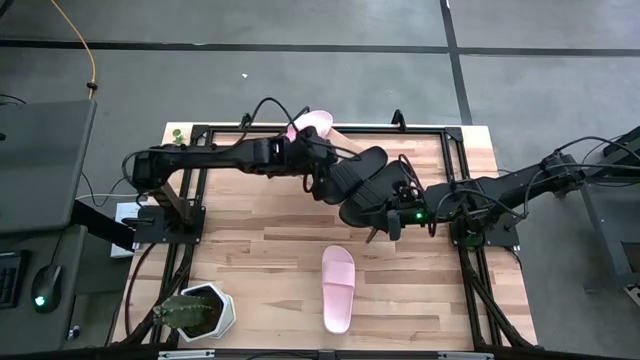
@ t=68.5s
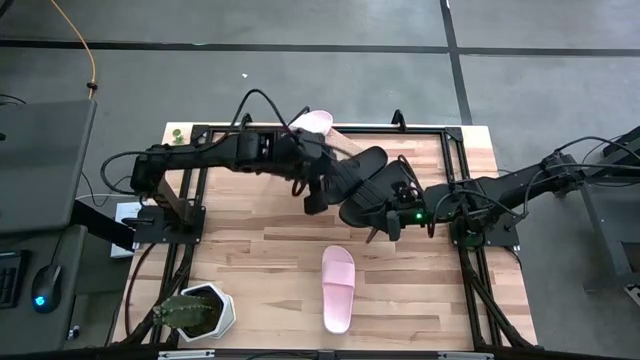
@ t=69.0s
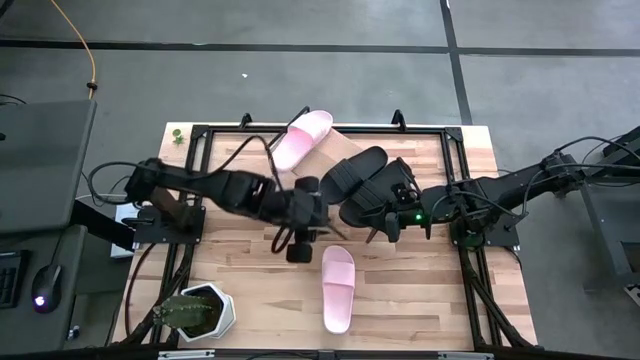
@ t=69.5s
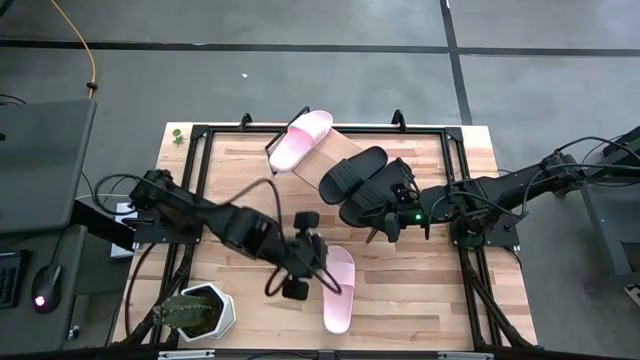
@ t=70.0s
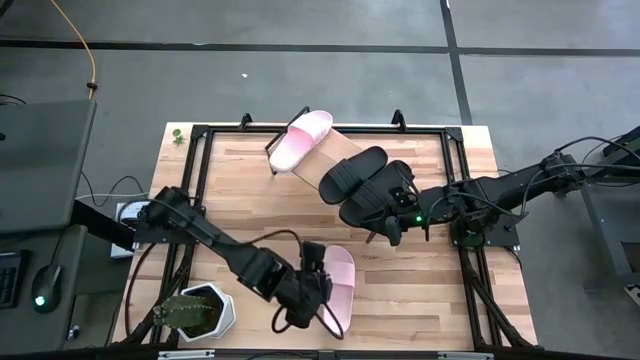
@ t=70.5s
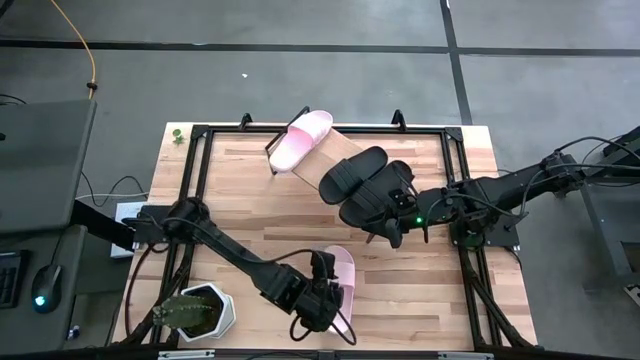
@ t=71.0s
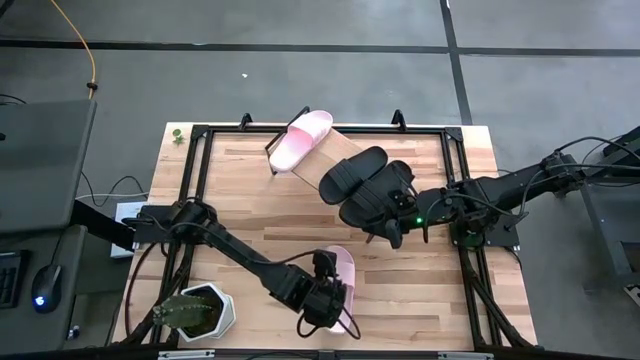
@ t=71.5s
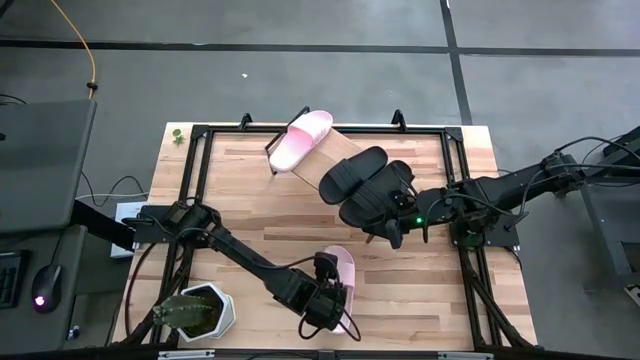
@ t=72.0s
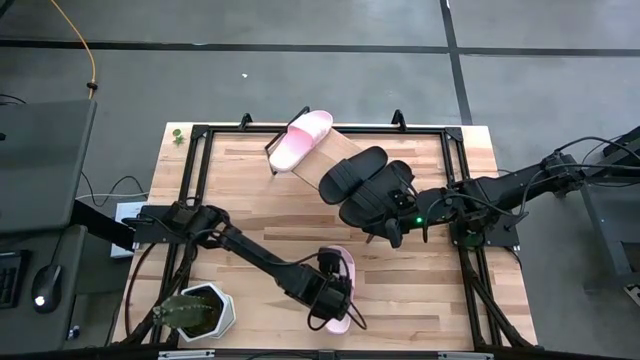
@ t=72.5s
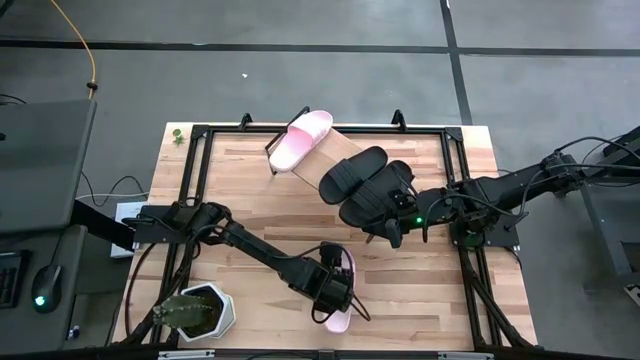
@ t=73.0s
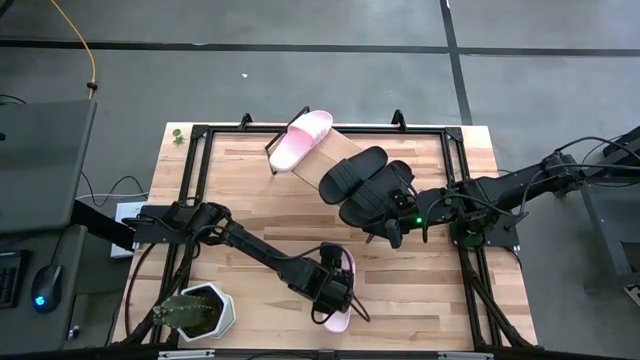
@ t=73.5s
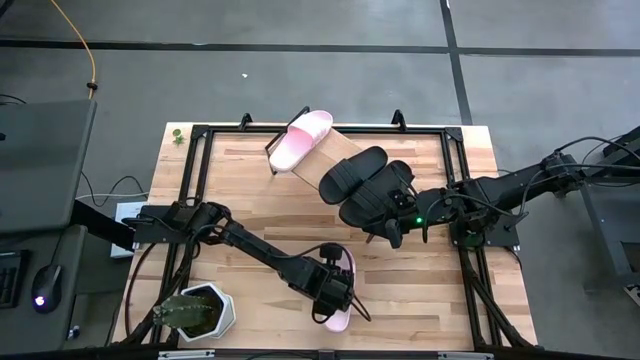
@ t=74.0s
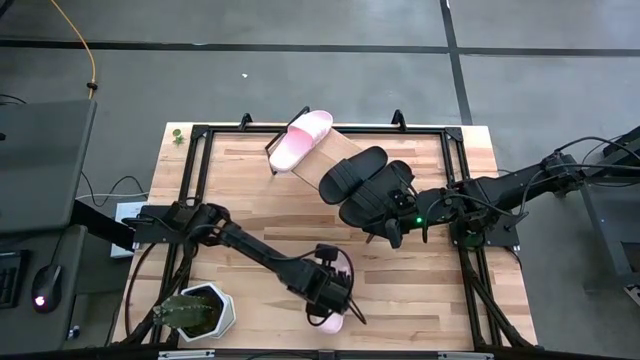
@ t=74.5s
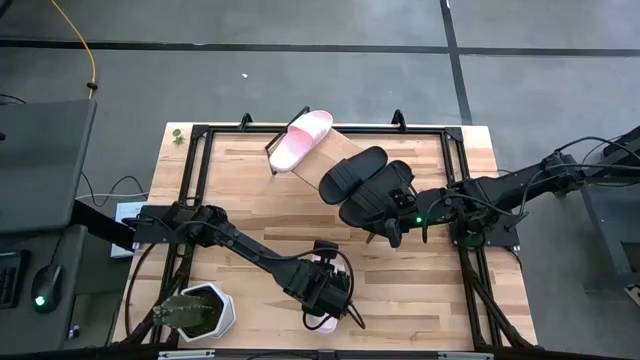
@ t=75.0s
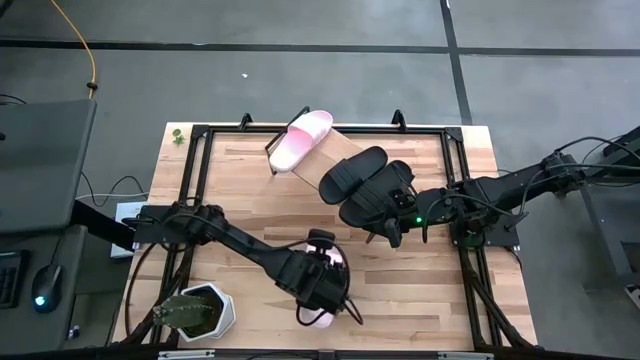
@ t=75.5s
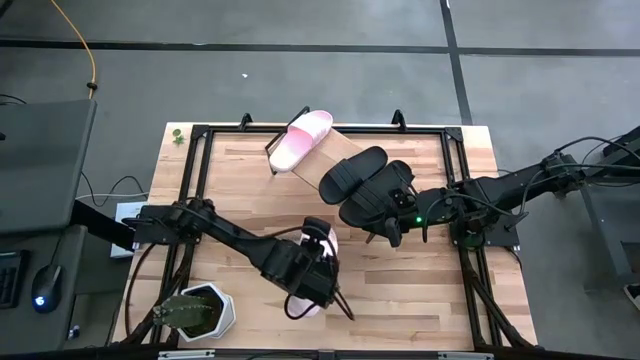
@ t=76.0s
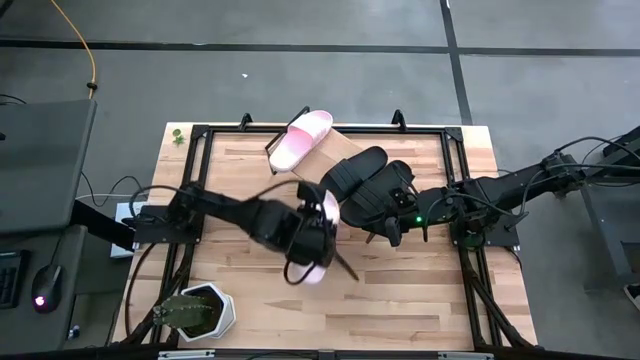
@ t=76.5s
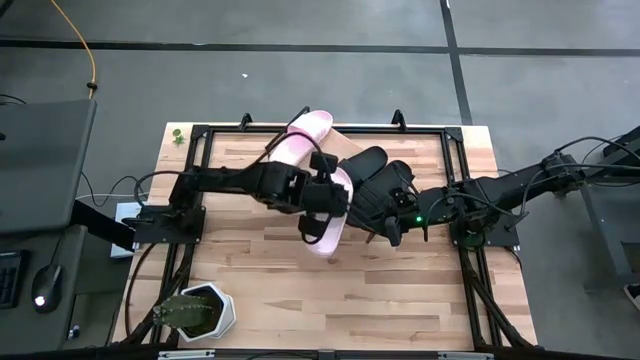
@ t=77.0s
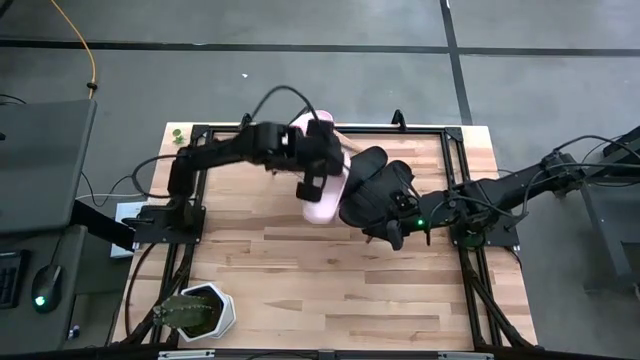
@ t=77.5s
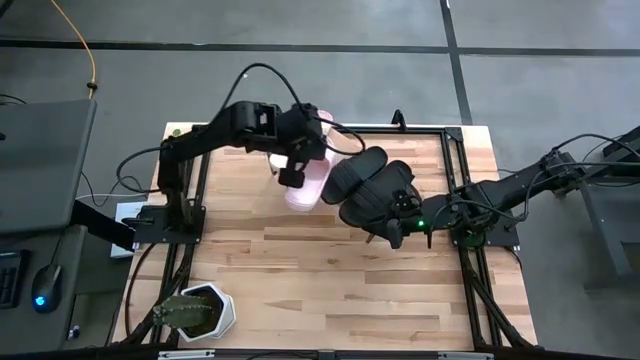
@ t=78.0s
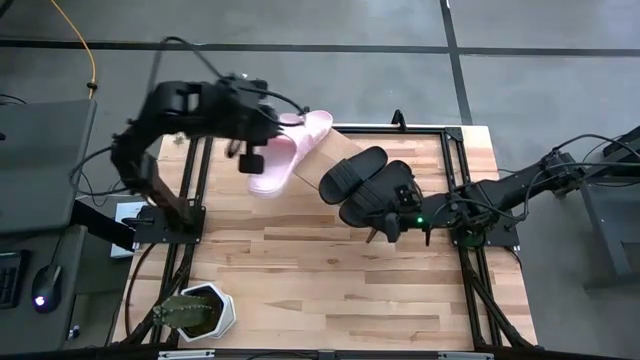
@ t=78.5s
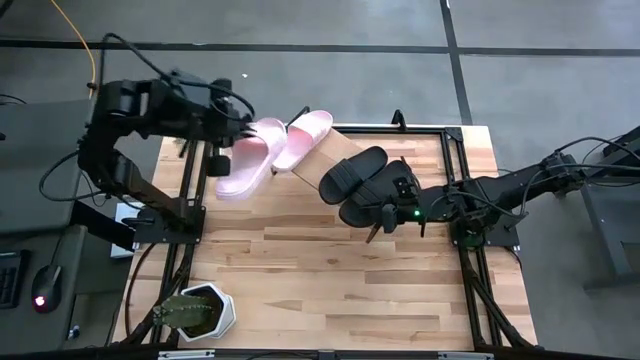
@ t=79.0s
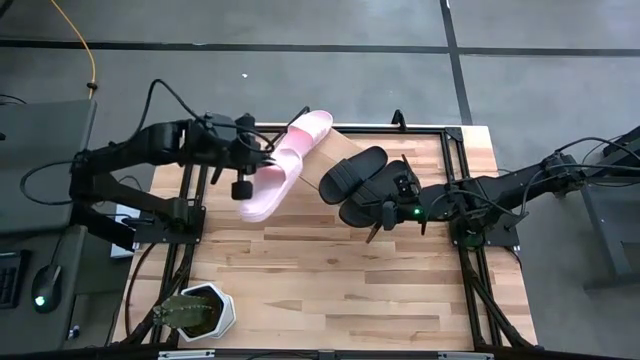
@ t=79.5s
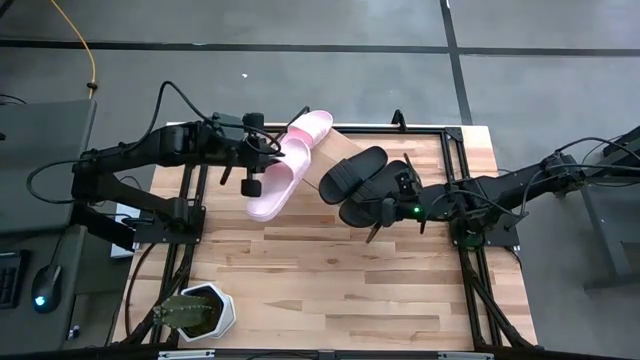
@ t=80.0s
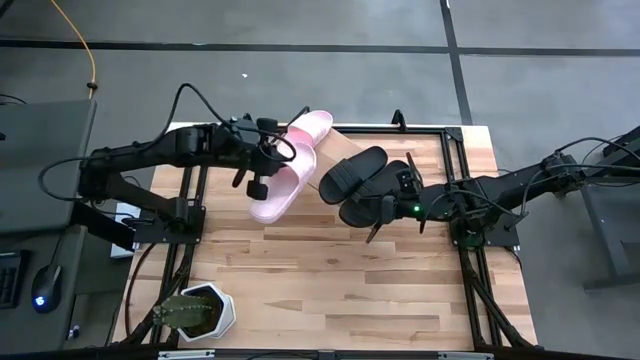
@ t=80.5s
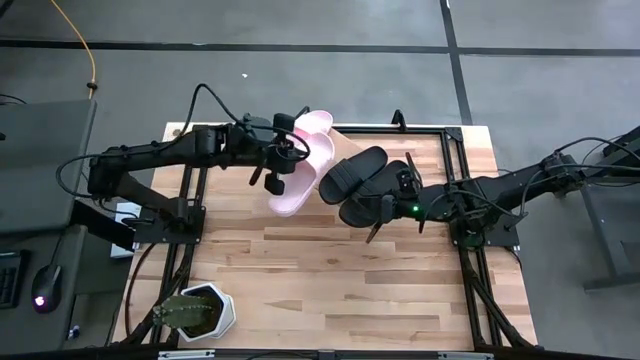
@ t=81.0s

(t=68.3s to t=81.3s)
Task: Pick and place slides into the shelf
Put the pink slide on the shelf

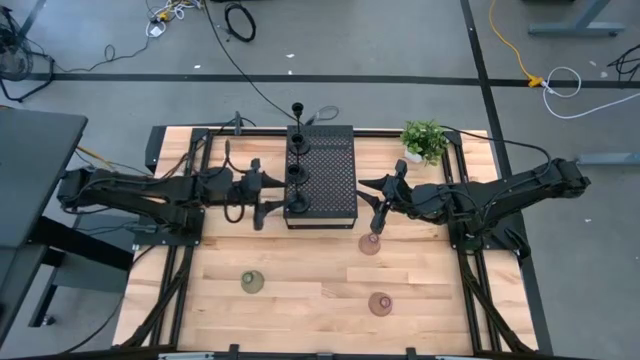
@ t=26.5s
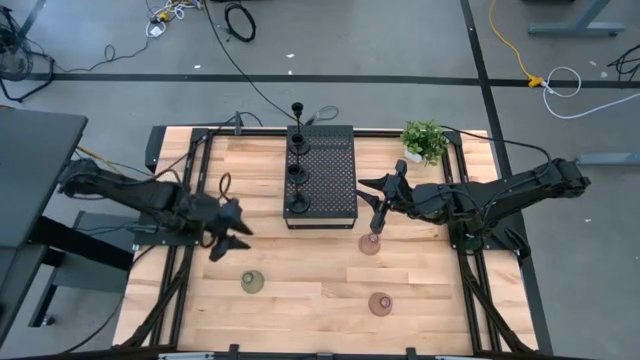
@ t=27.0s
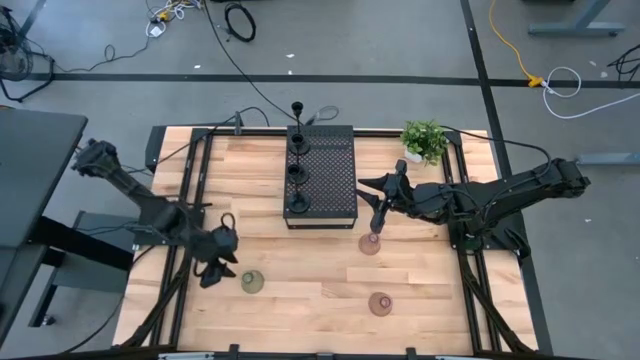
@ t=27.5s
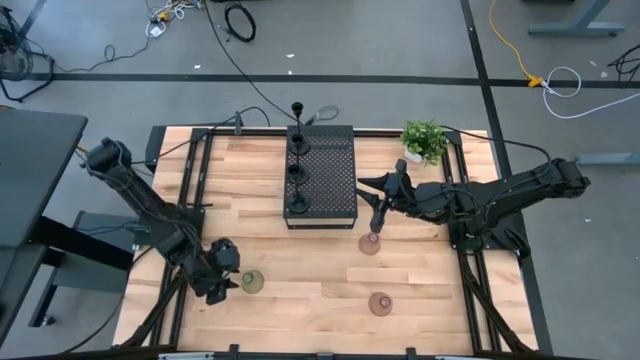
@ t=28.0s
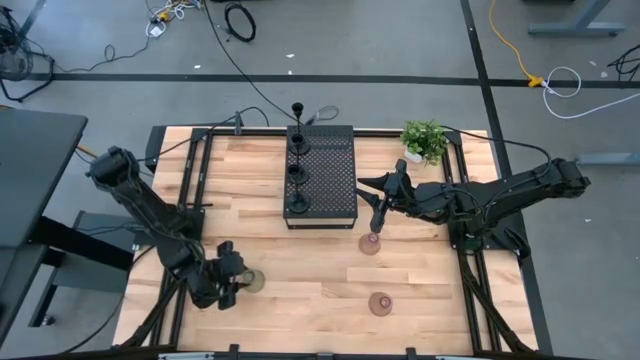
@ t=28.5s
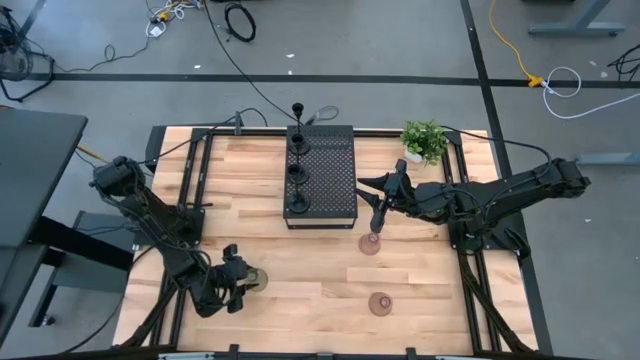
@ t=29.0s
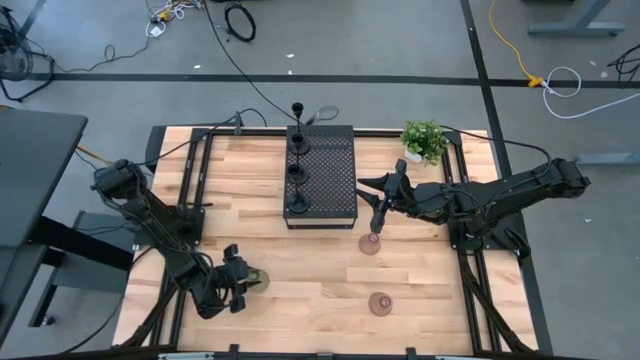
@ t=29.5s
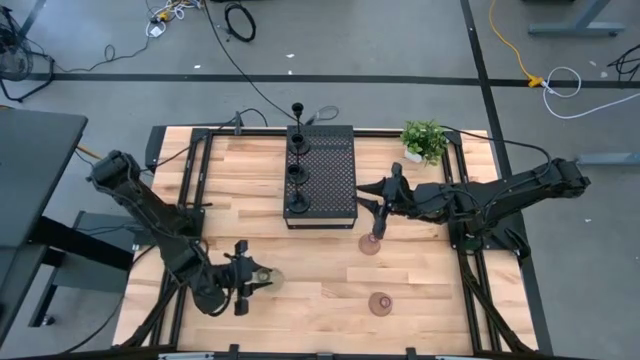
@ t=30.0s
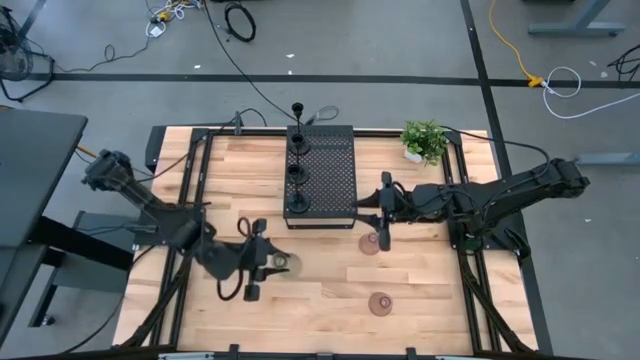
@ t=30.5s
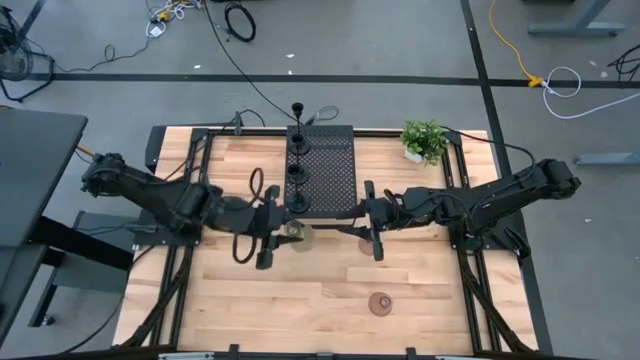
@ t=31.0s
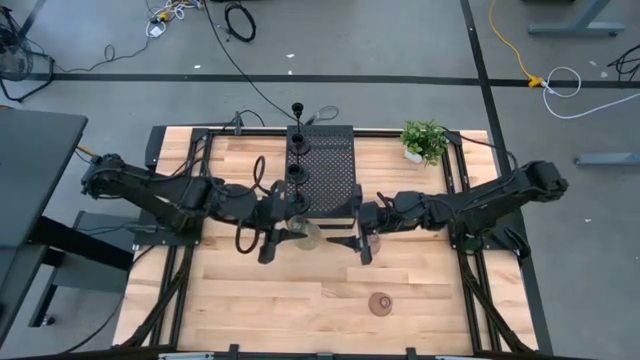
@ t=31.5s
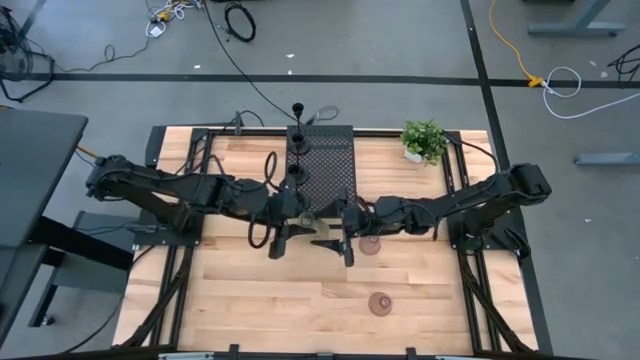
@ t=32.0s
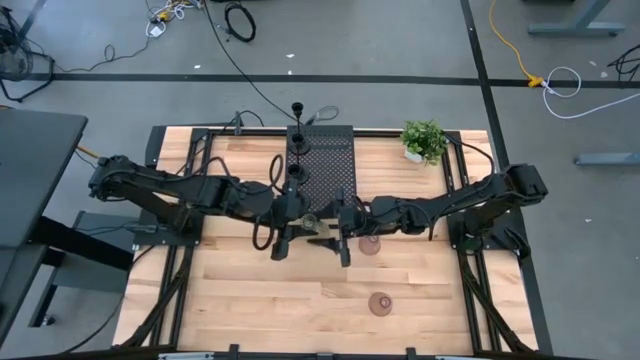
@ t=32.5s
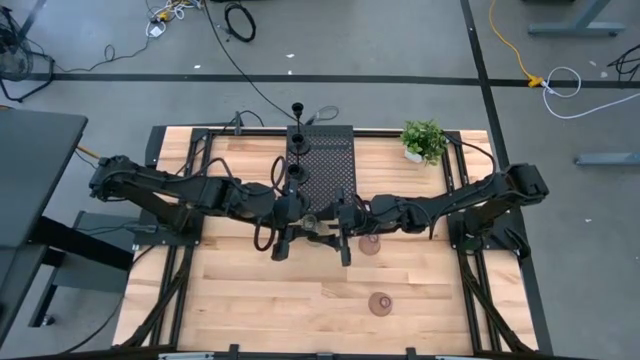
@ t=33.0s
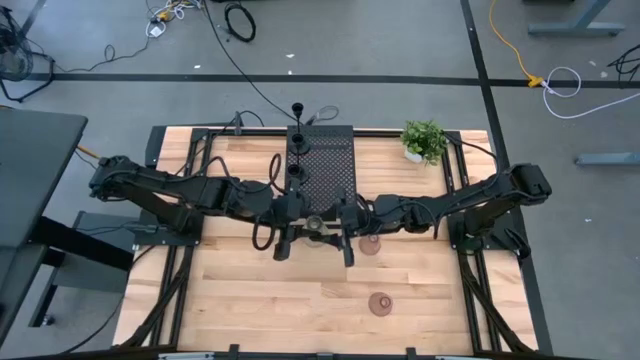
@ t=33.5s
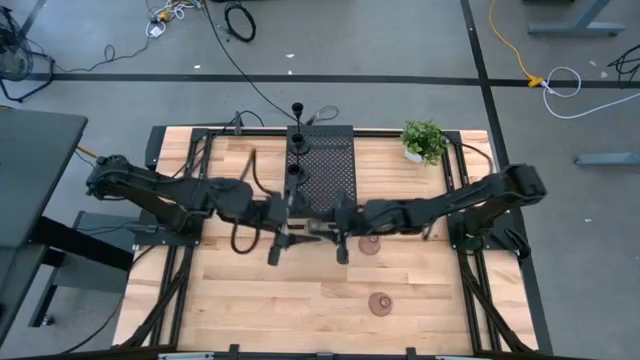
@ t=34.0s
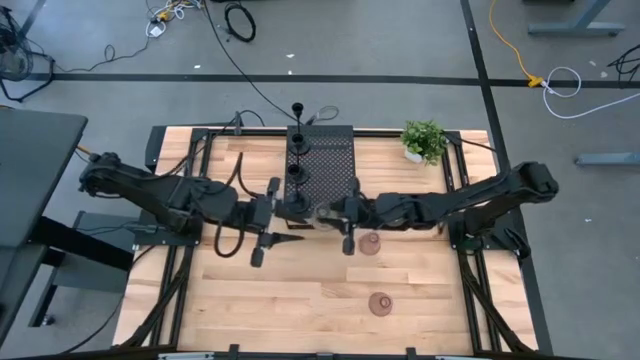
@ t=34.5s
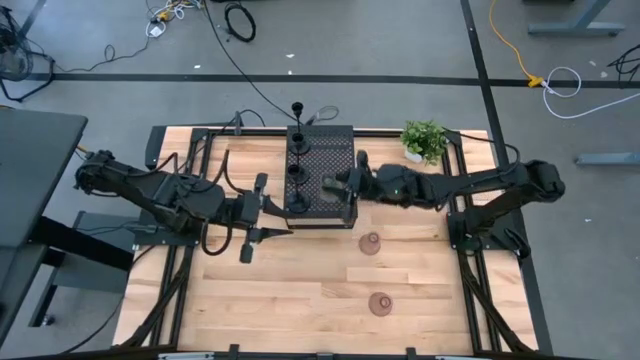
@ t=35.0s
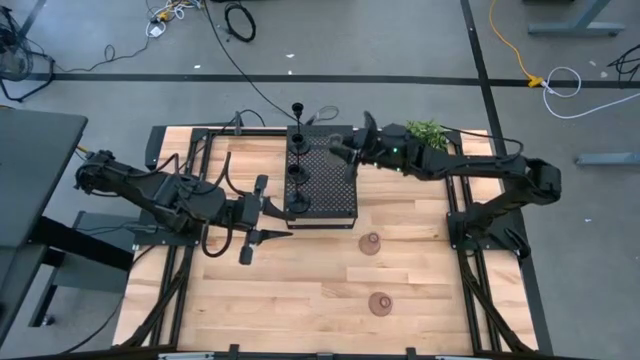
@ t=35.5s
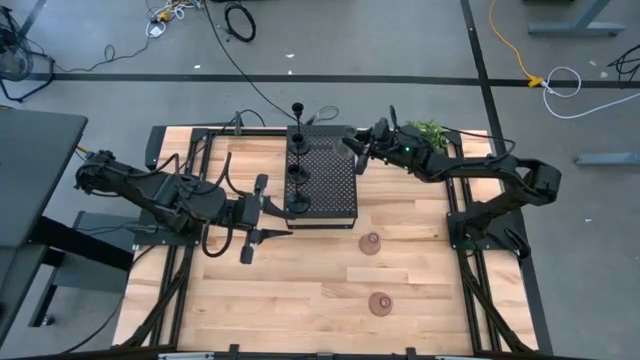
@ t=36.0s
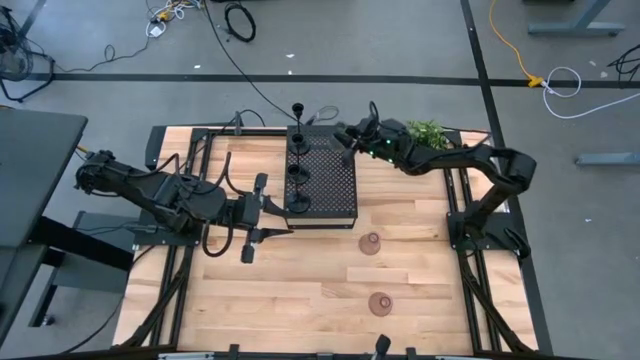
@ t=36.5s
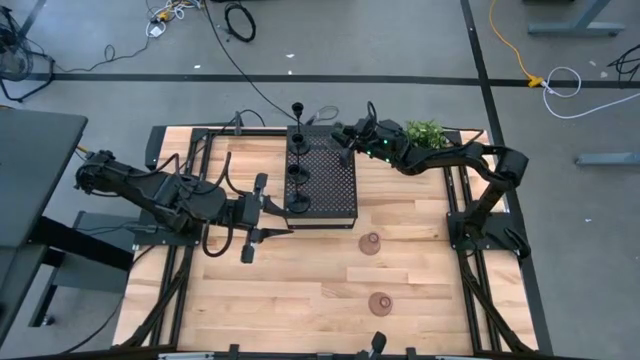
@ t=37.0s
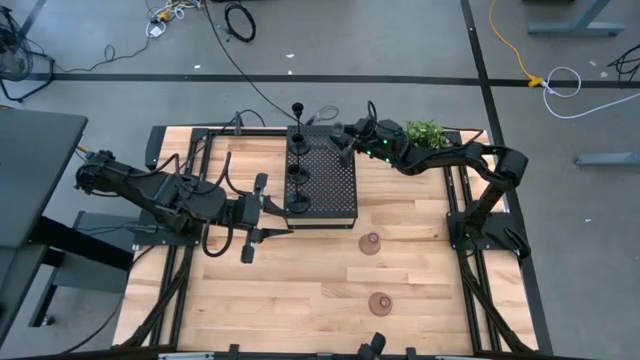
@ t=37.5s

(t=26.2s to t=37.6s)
Task: Pick & Place candle stick holders
Put the green candle holder on the shelf
